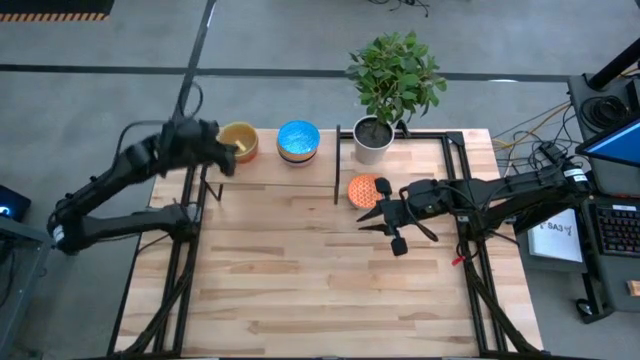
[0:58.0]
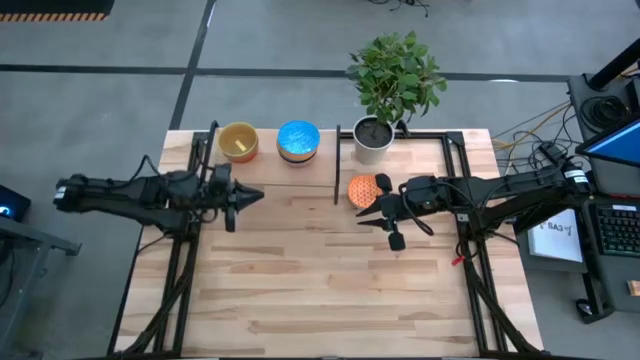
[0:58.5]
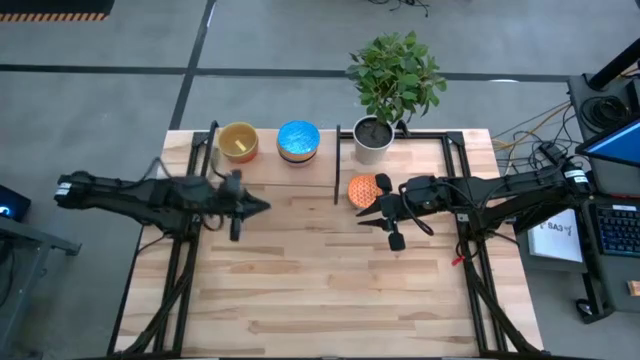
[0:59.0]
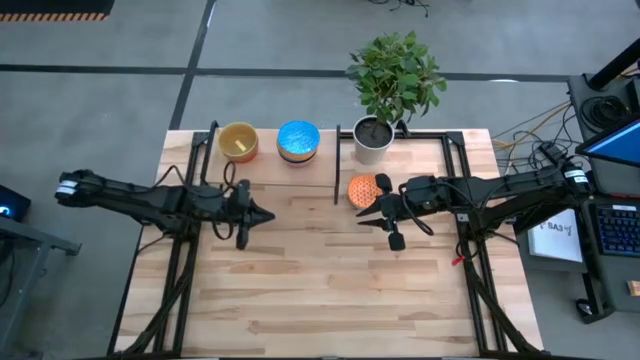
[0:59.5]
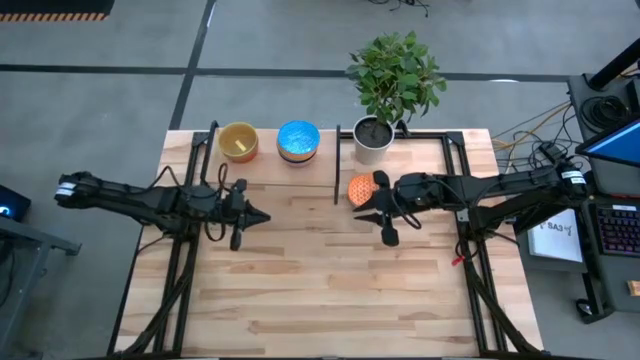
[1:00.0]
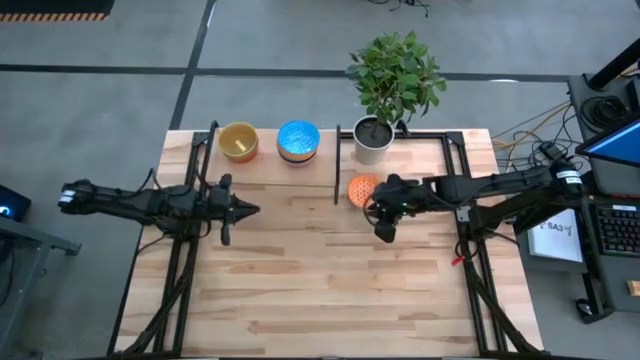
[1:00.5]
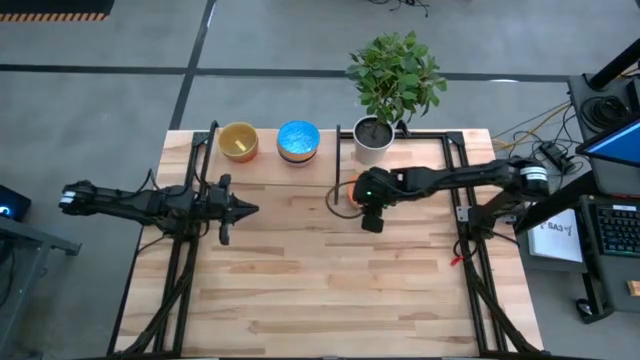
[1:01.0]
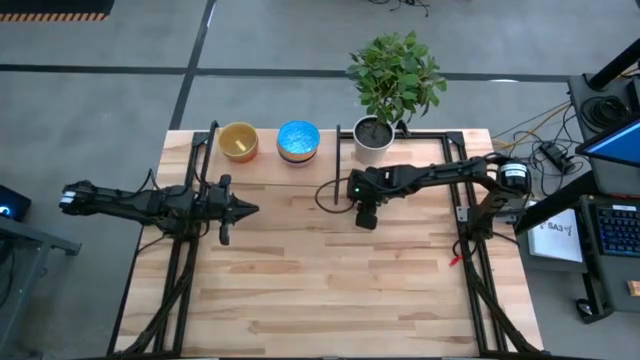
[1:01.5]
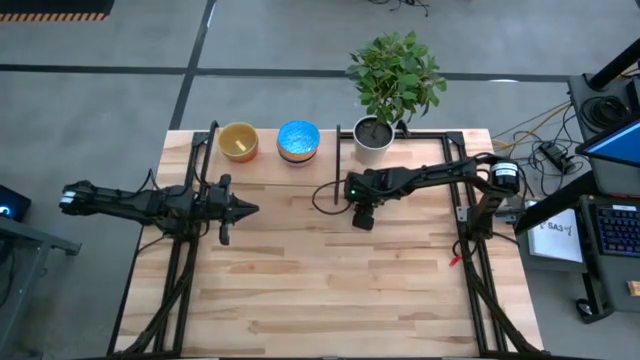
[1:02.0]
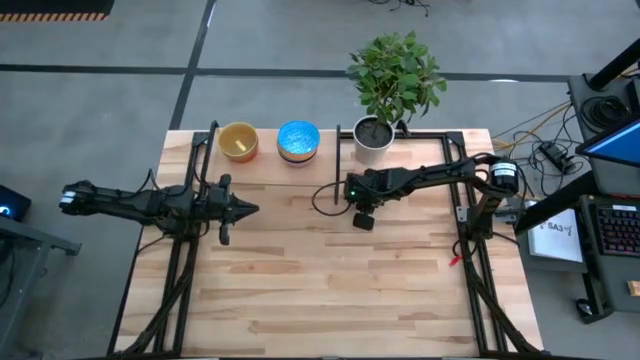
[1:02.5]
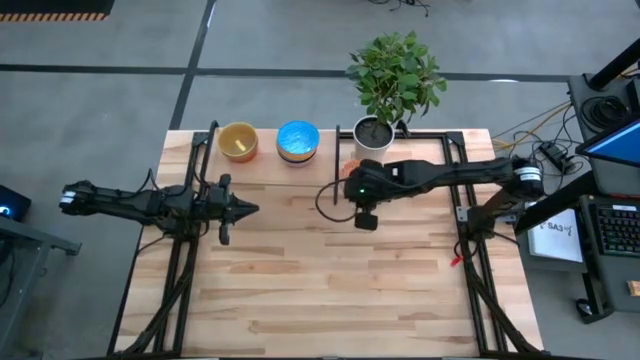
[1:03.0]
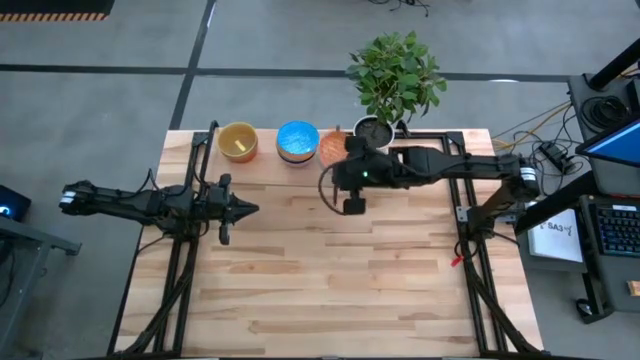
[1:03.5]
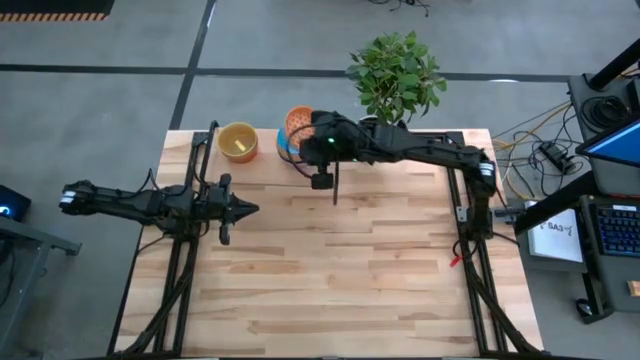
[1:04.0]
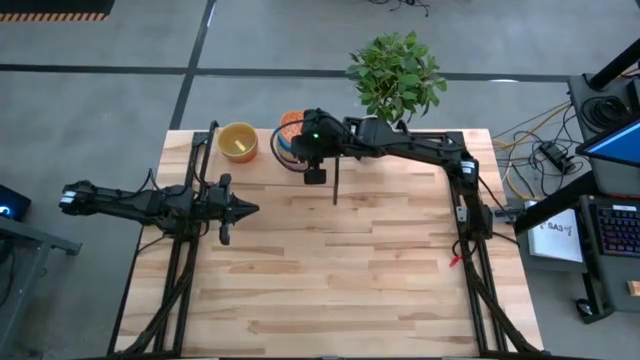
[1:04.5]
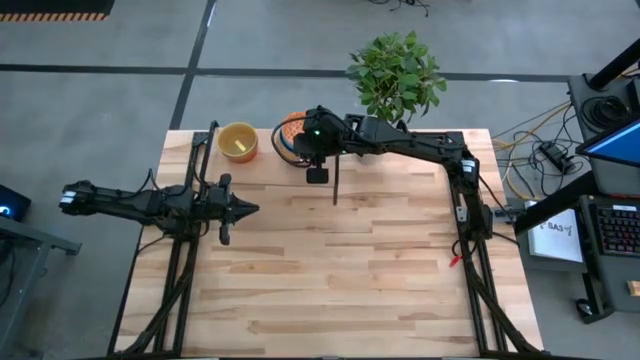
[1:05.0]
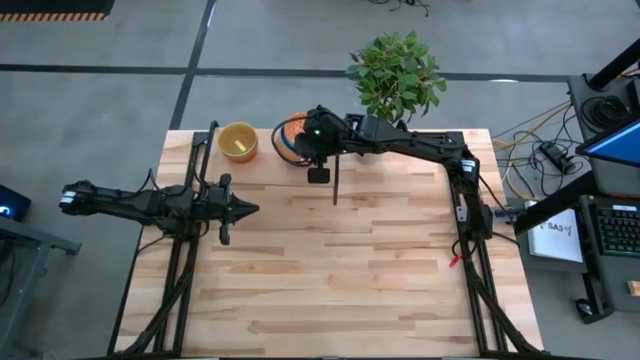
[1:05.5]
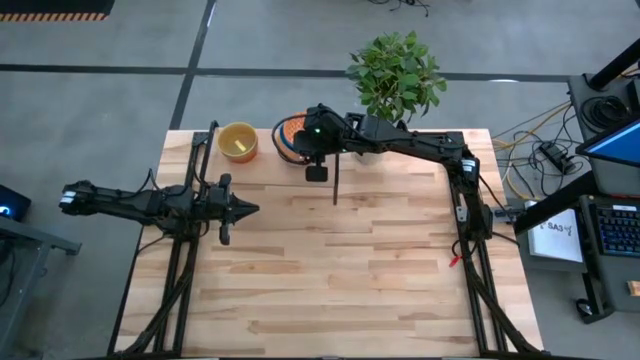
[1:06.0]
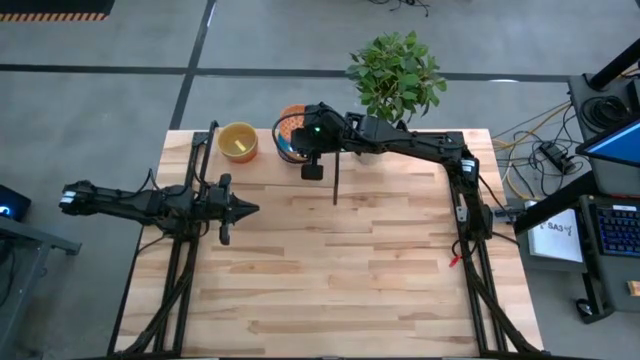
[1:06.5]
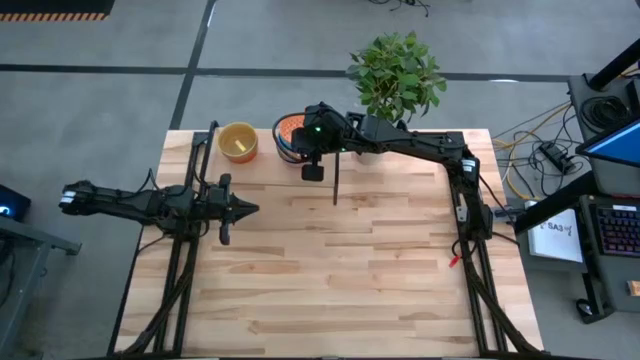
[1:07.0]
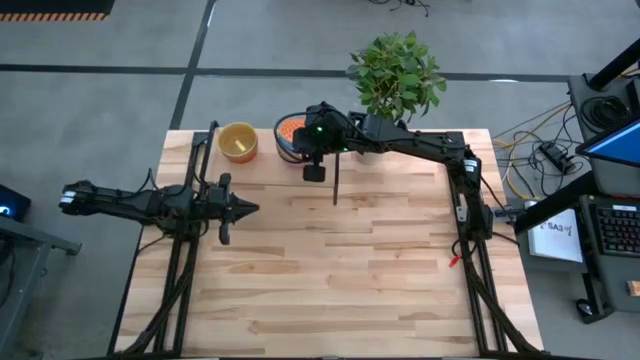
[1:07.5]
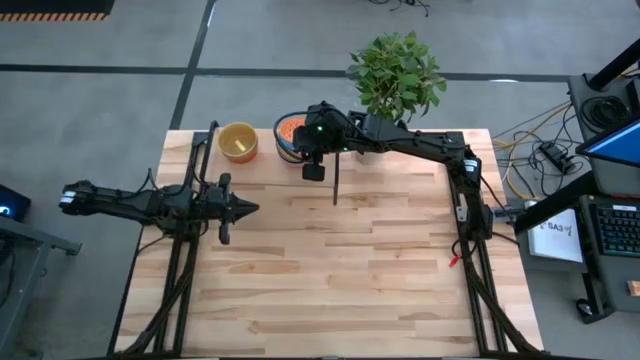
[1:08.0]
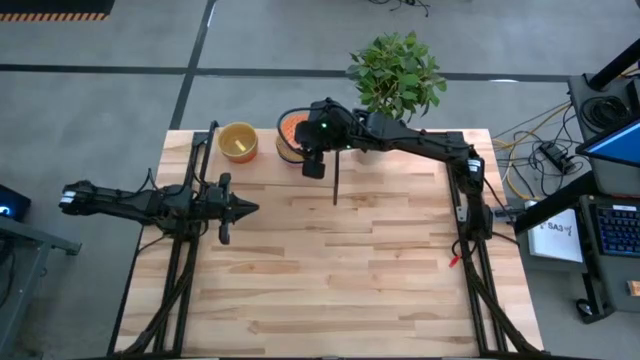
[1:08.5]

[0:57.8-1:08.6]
Task: Place and stack bowls onto a shelf
Stack the blue bowl on the orange bowl on the shelf

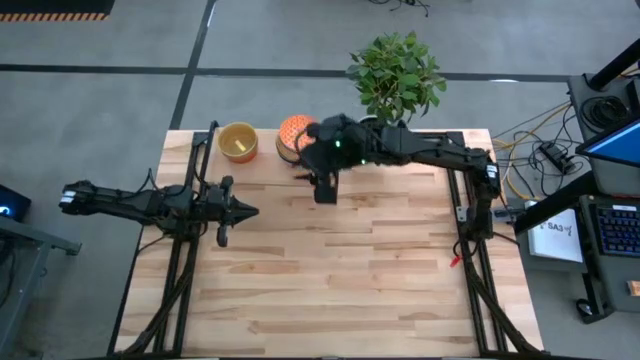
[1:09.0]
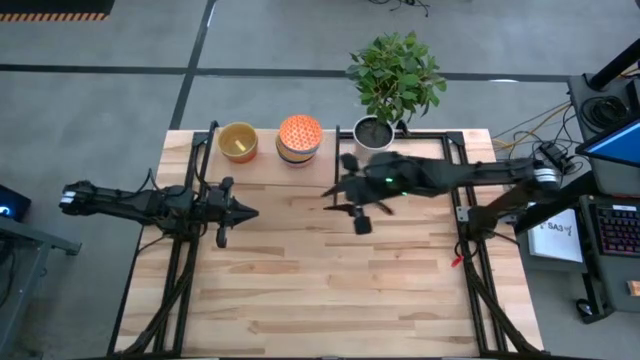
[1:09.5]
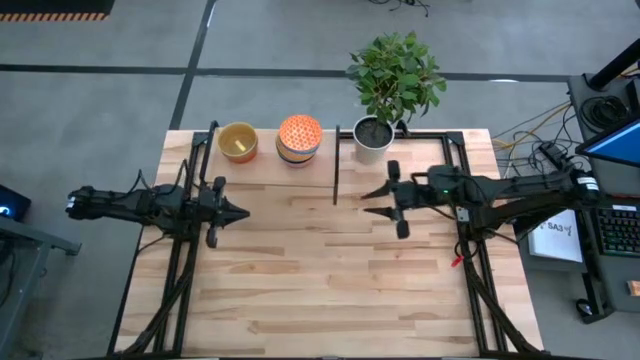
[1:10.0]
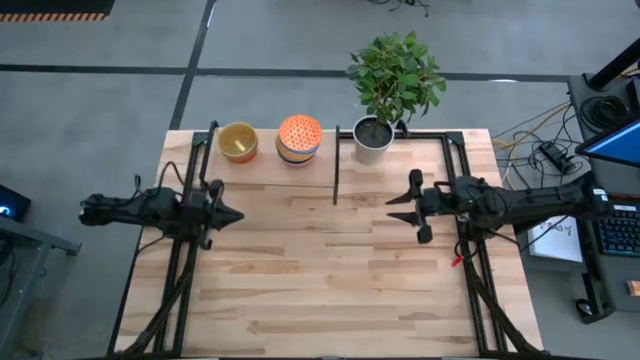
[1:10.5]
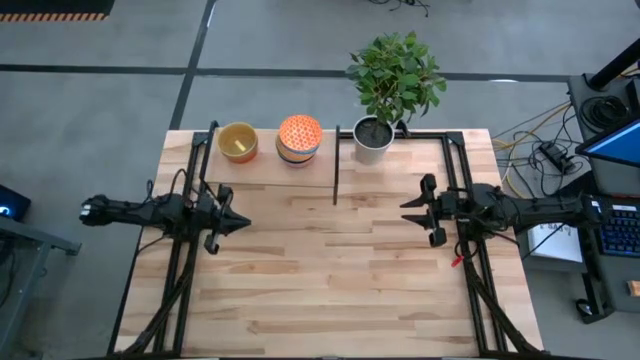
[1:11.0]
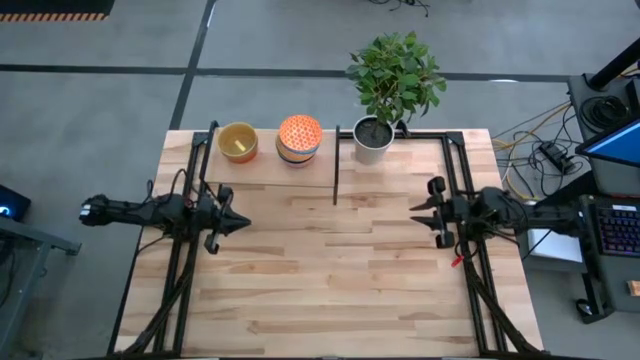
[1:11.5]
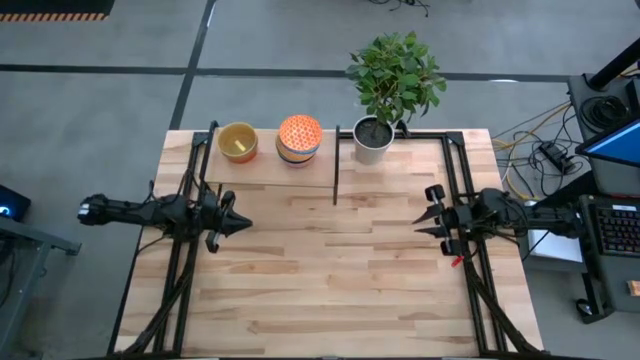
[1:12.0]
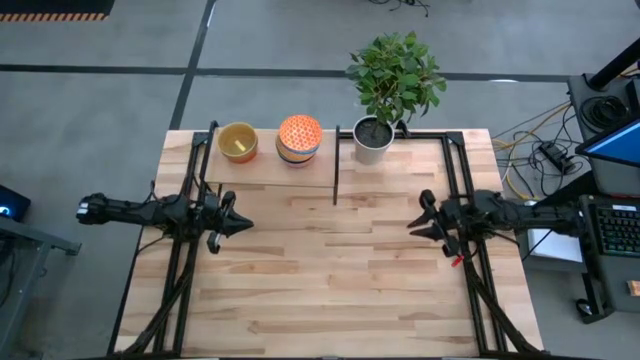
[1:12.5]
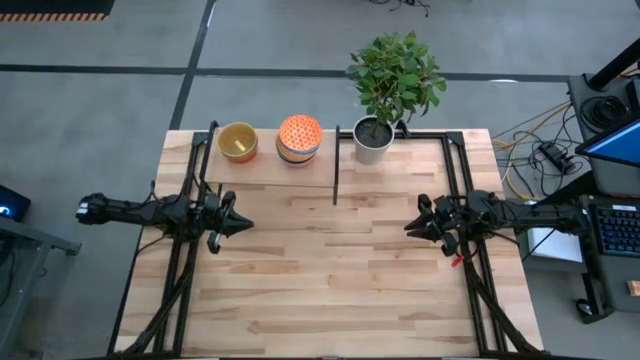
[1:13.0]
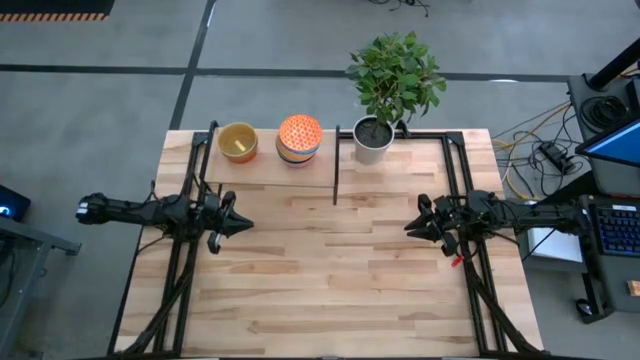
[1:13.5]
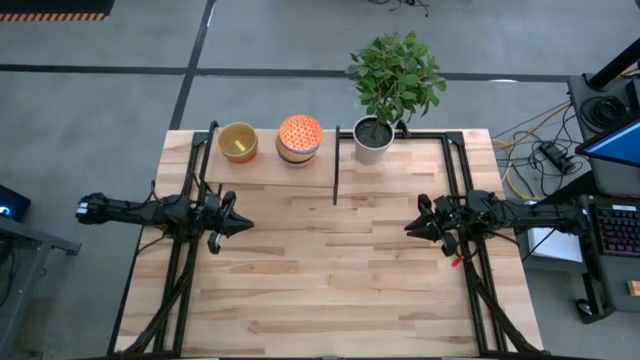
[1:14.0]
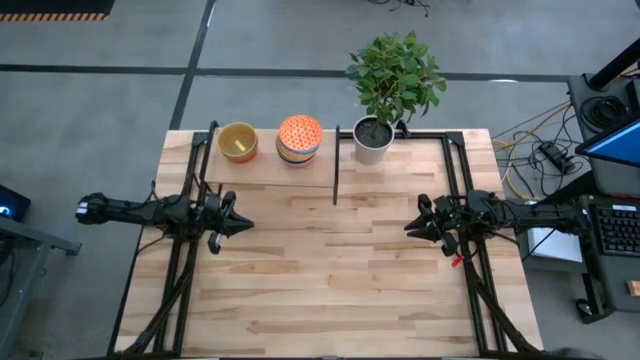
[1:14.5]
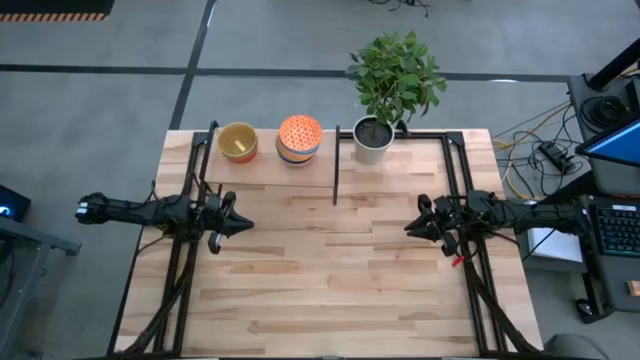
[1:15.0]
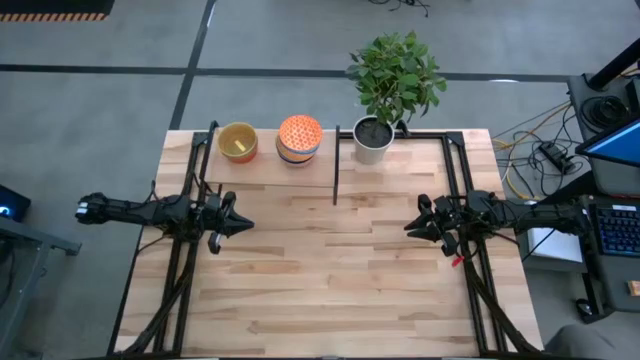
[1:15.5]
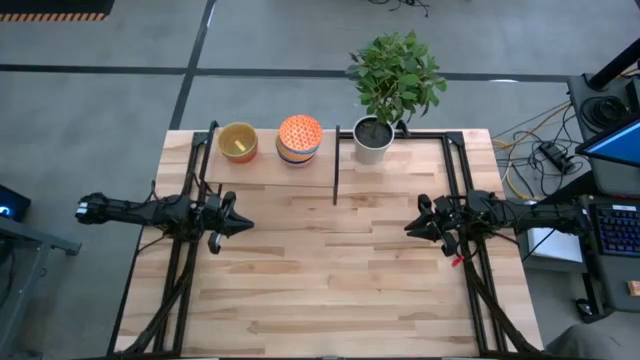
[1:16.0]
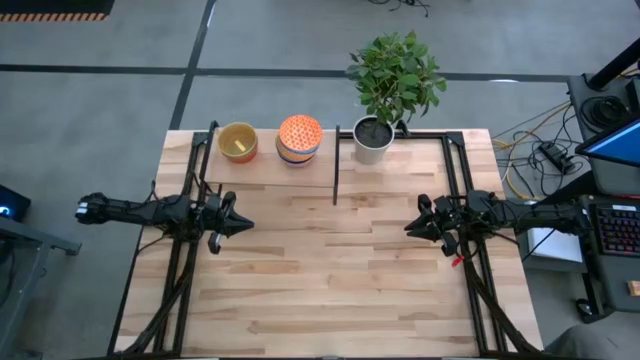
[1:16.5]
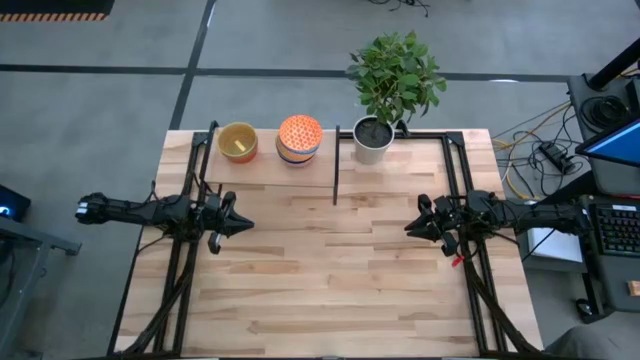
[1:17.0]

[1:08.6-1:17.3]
Return to Home Position

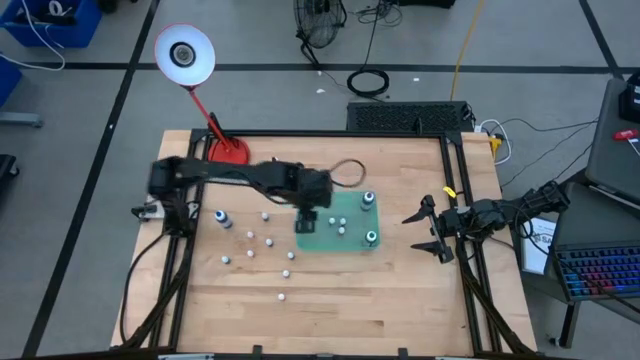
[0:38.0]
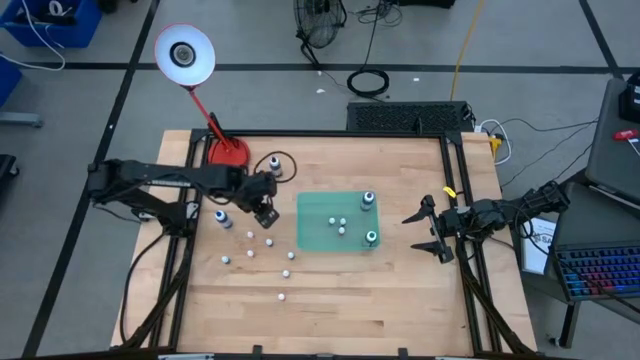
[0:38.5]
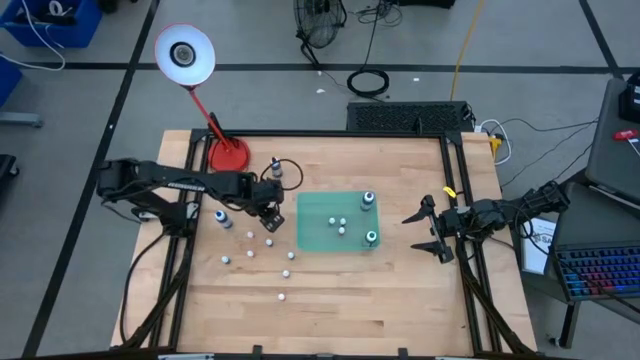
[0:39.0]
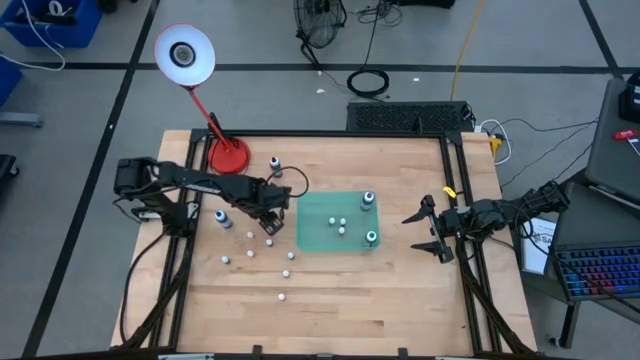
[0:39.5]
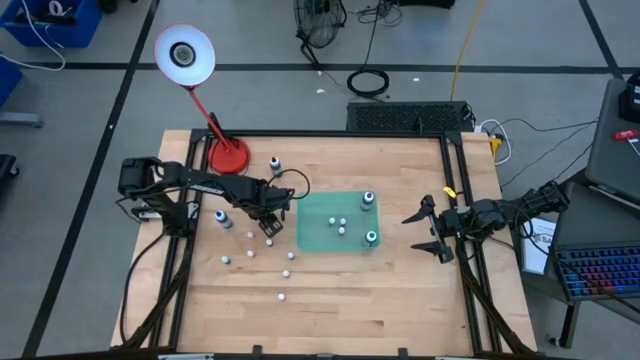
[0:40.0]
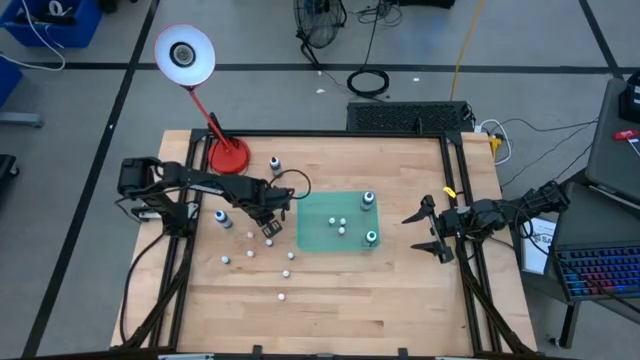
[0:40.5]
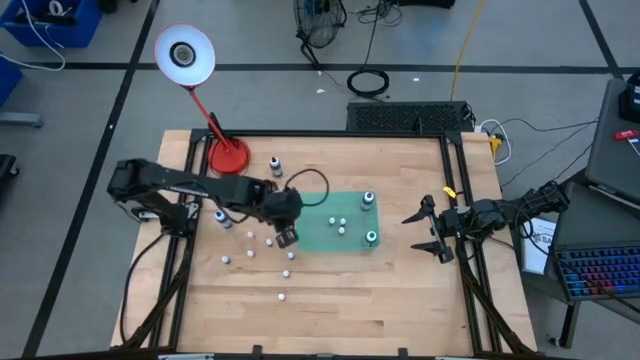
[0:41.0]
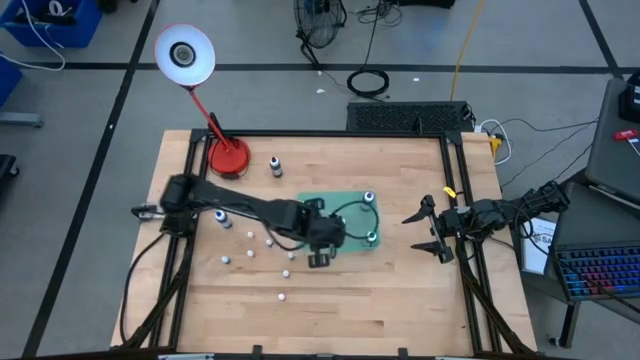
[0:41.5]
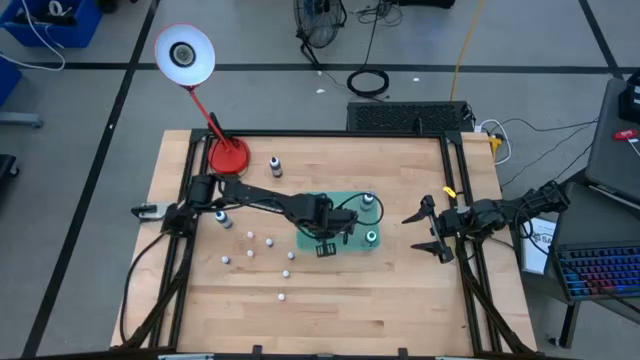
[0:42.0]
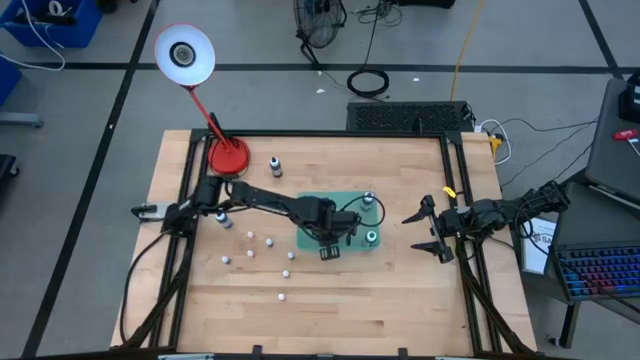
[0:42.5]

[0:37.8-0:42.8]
Task: Pick & Place food coloring
Put the small green food coloring bottle into the blue bin
